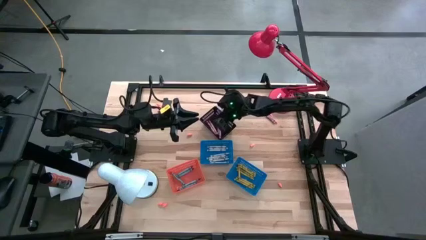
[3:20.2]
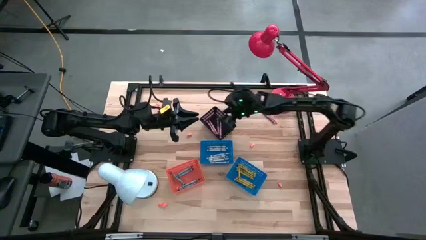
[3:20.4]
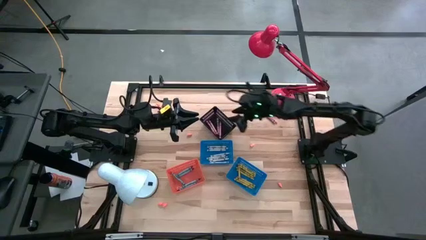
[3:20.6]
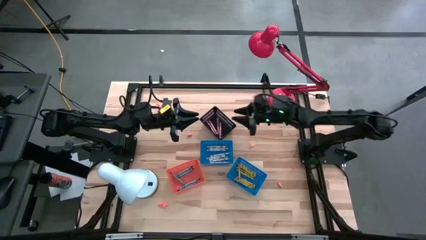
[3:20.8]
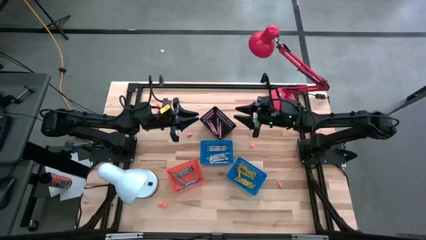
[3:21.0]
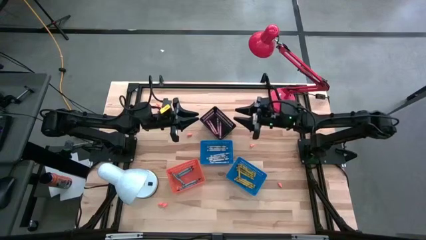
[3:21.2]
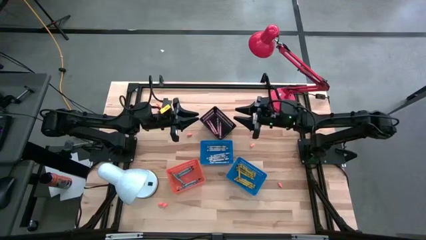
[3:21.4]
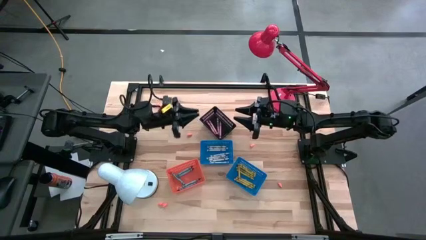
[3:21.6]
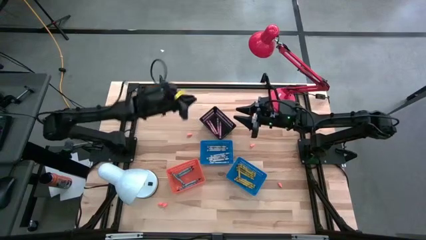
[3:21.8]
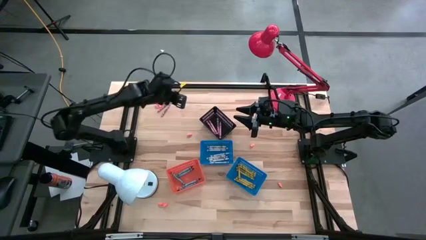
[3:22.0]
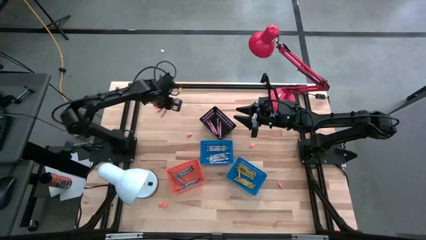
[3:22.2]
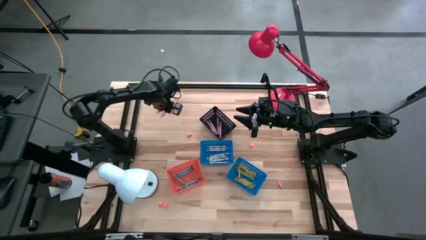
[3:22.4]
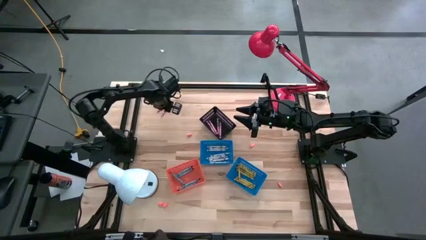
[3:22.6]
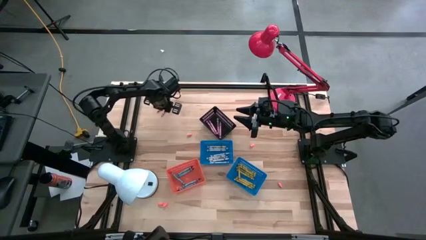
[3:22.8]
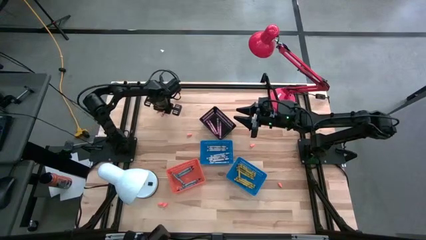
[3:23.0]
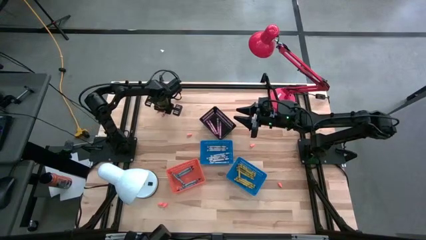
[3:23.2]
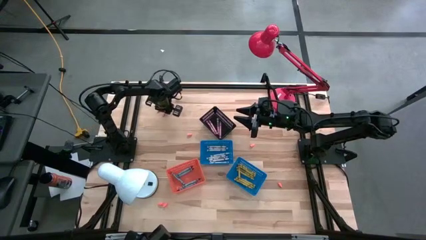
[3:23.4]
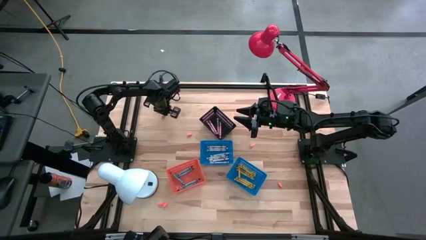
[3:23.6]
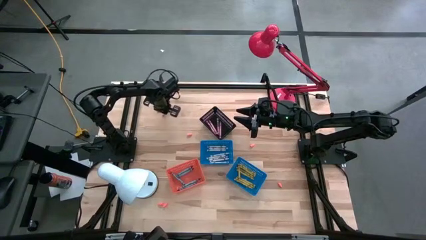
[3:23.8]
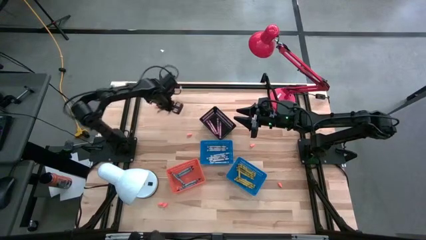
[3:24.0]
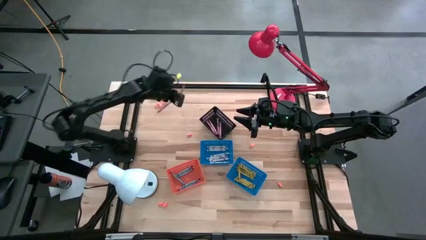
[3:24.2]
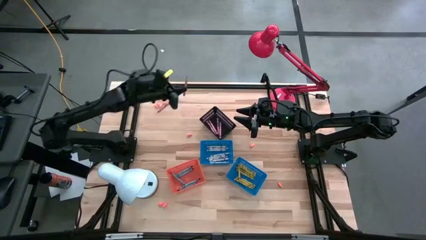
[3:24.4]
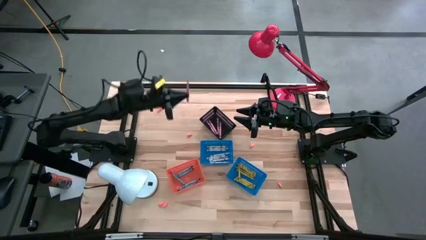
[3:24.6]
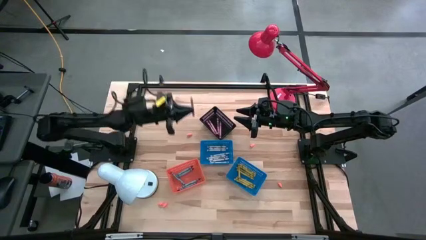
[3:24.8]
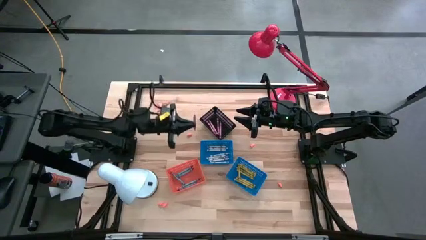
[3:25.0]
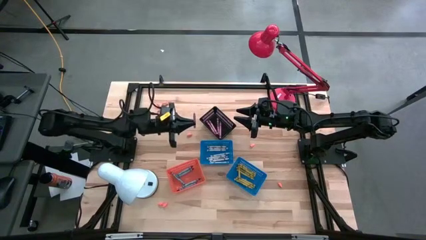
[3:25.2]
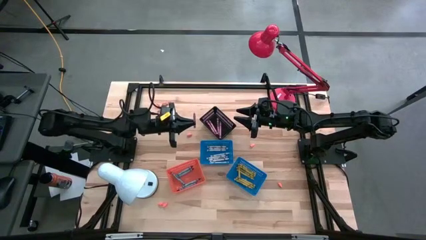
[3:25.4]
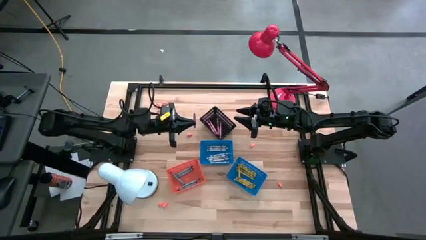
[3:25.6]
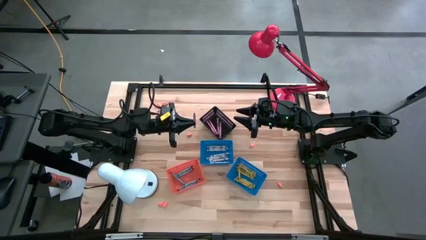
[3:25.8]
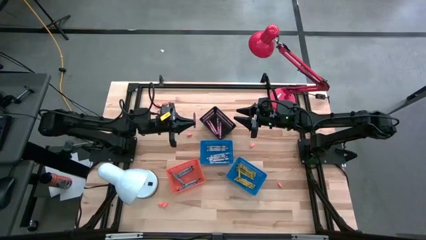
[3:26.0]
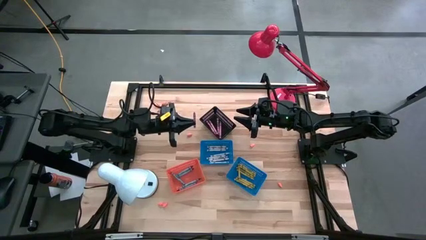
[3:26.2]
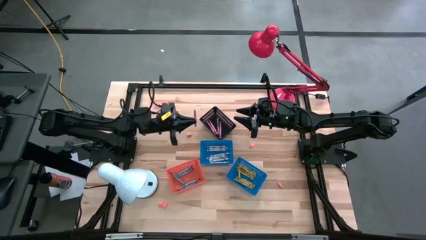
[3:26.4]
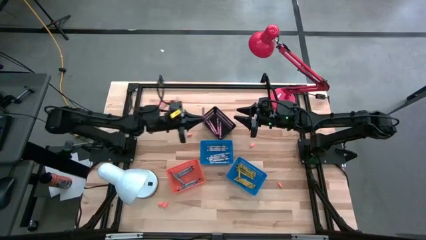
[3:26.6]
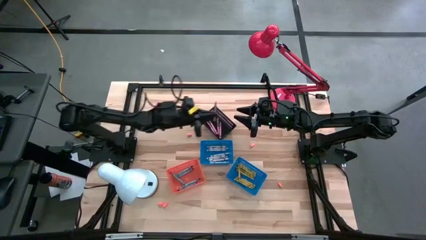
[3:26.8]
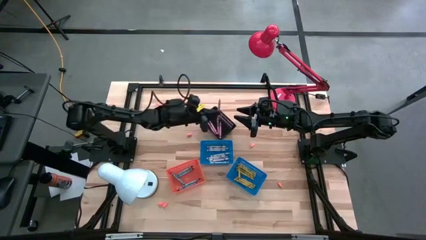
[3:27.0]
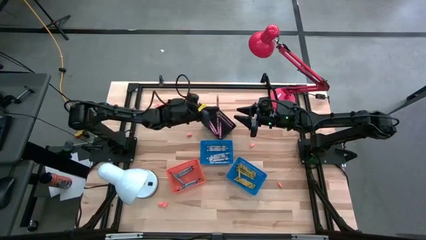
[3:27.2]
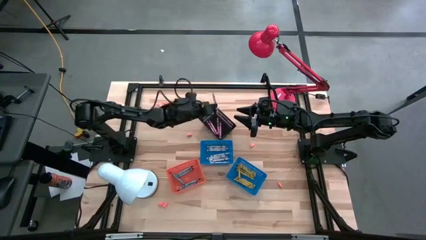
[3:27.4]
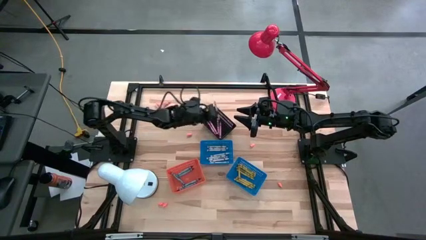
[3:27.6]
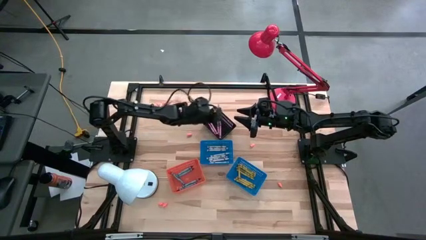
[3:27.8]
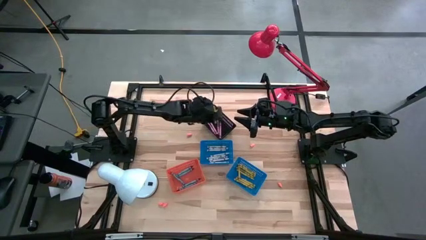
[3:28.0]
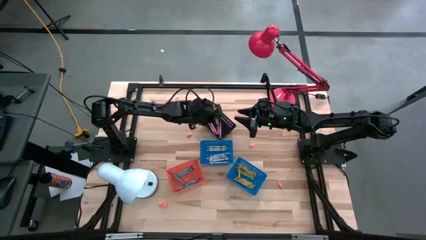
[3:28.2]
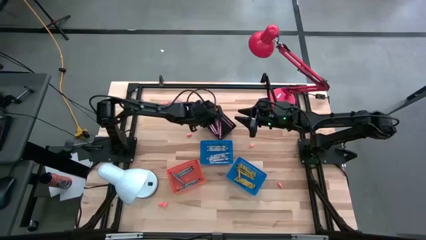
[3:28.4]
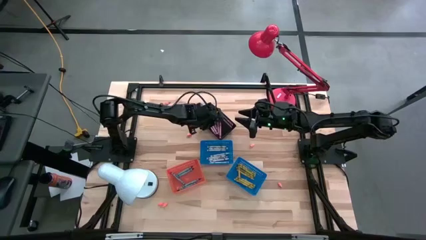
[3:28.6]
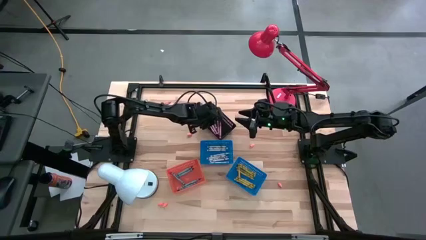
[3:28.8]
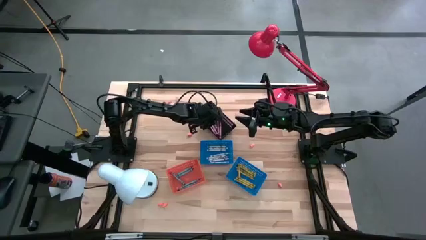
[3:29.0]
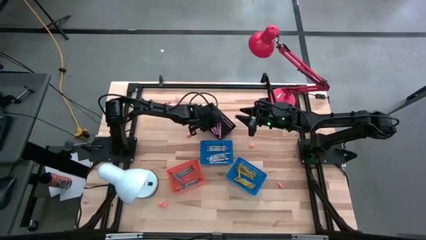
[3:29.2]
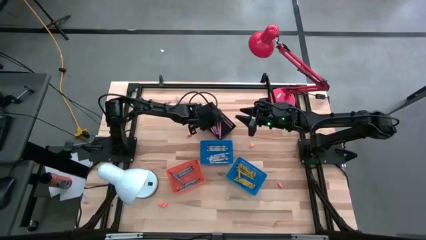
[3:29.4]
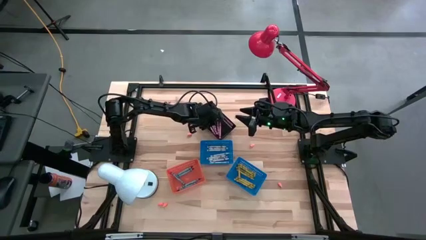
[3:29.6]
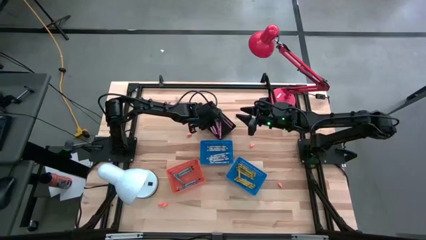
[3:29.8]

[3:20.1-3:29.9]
Task: Sort crayons
Put the pink crayon into the black bin

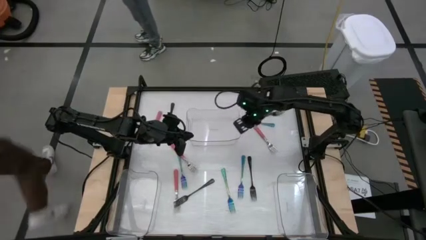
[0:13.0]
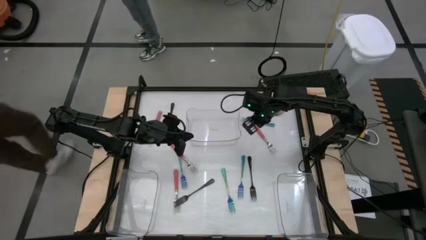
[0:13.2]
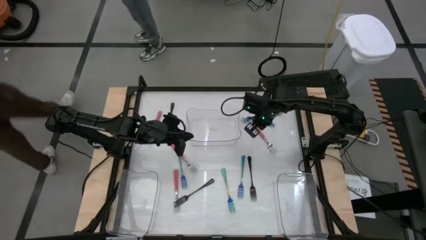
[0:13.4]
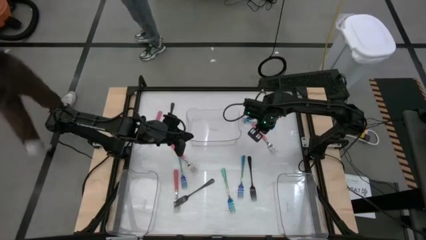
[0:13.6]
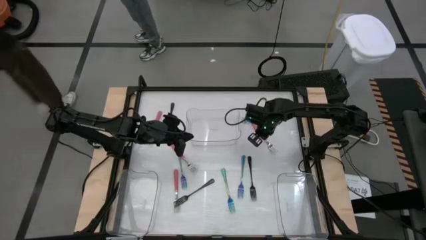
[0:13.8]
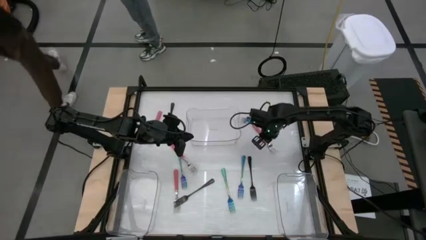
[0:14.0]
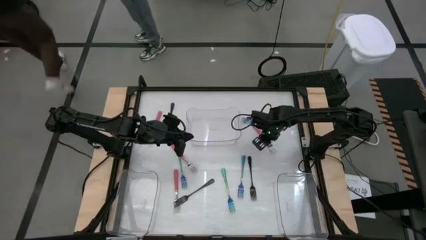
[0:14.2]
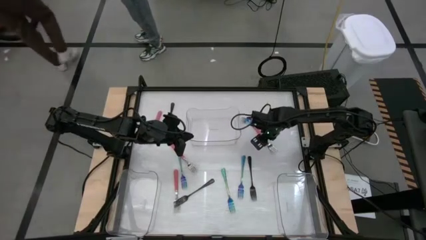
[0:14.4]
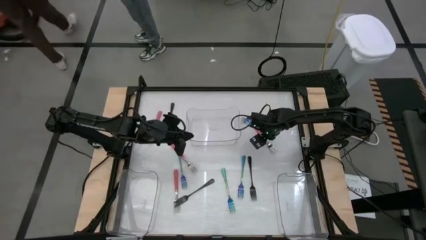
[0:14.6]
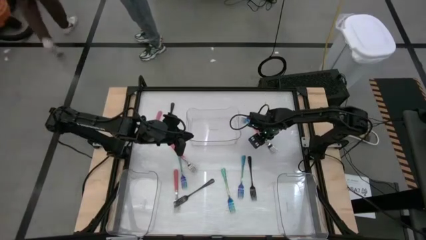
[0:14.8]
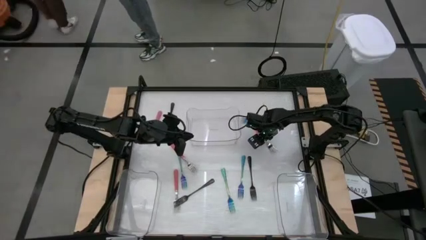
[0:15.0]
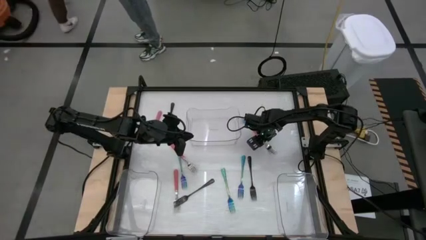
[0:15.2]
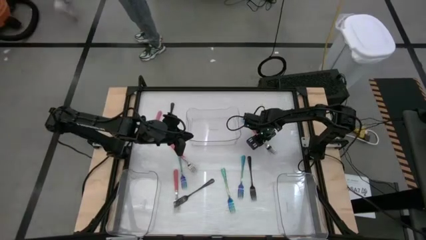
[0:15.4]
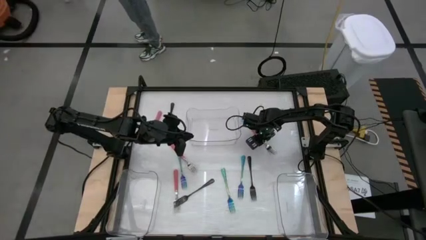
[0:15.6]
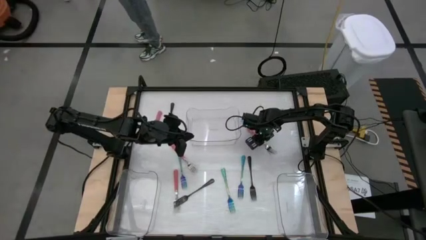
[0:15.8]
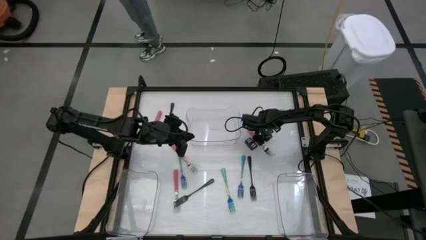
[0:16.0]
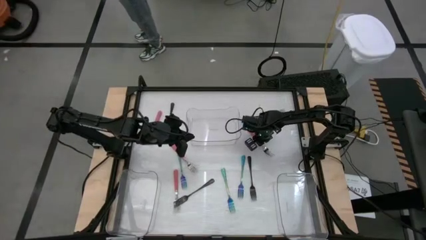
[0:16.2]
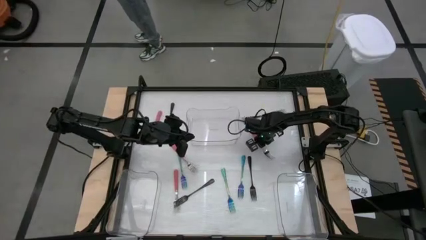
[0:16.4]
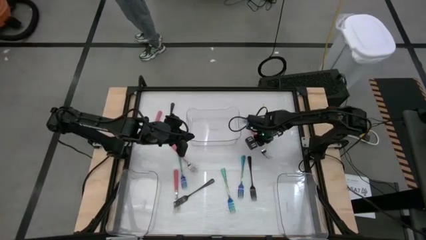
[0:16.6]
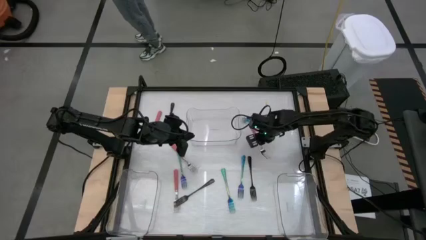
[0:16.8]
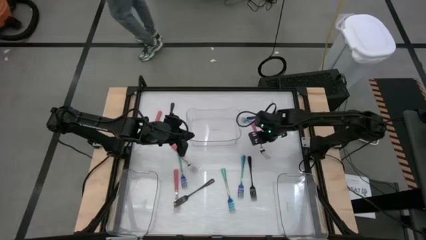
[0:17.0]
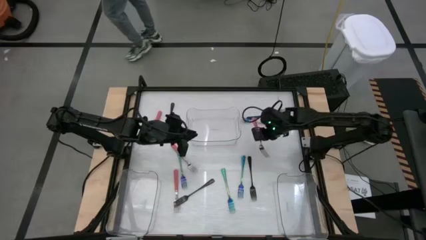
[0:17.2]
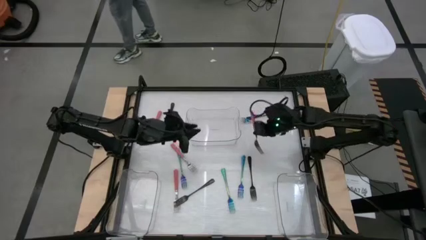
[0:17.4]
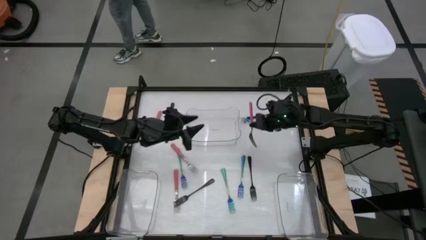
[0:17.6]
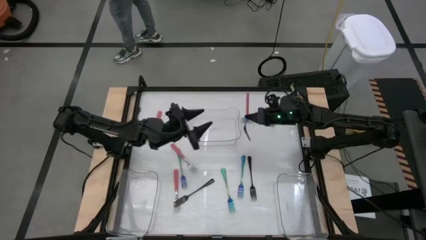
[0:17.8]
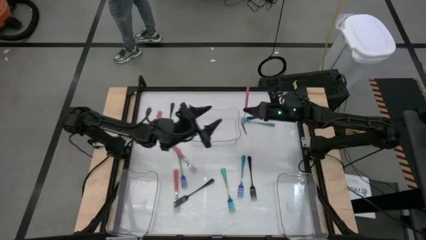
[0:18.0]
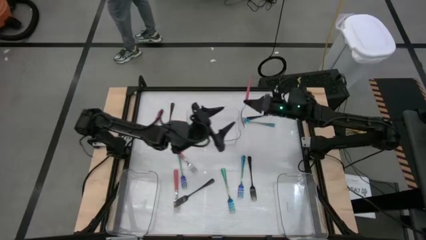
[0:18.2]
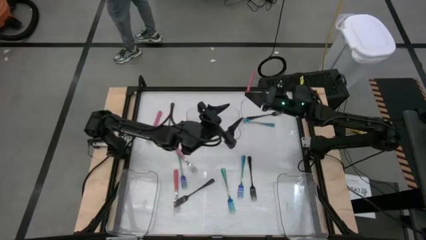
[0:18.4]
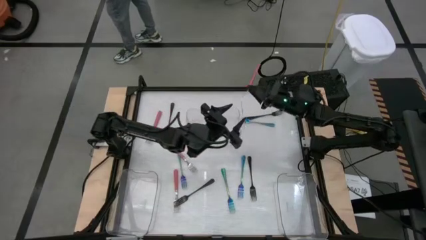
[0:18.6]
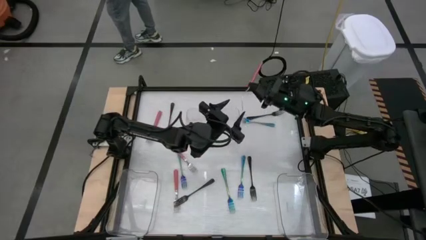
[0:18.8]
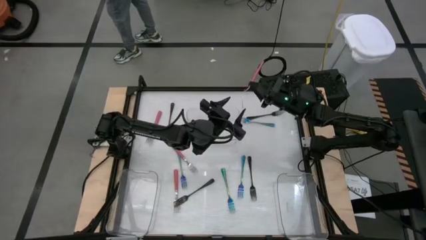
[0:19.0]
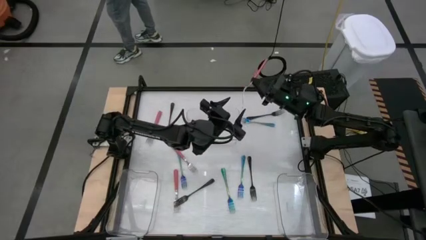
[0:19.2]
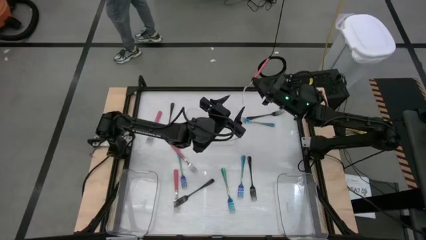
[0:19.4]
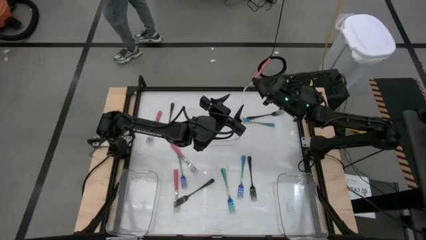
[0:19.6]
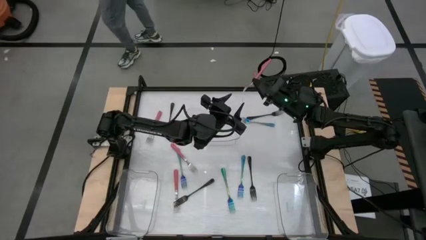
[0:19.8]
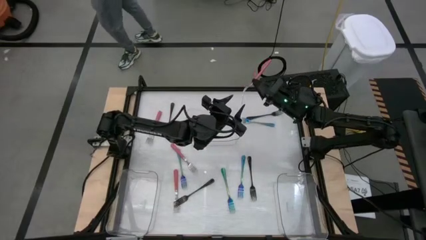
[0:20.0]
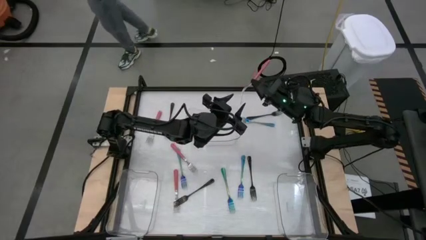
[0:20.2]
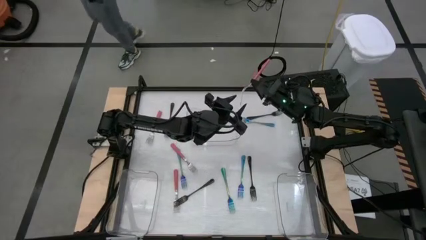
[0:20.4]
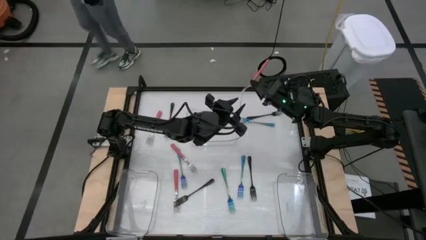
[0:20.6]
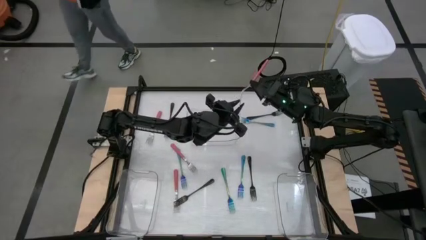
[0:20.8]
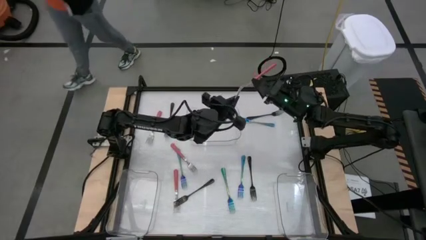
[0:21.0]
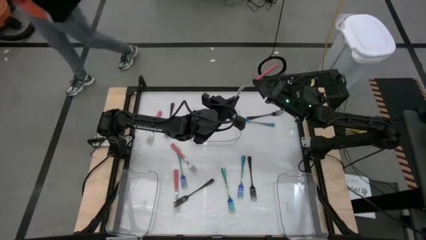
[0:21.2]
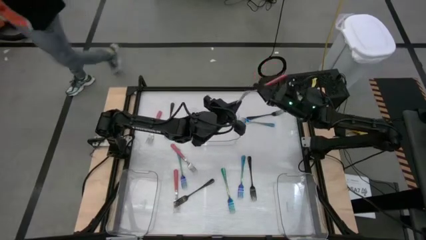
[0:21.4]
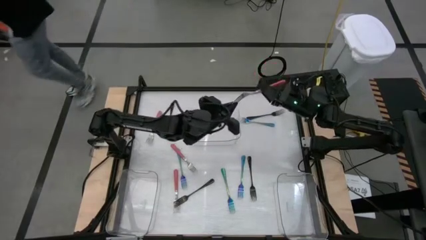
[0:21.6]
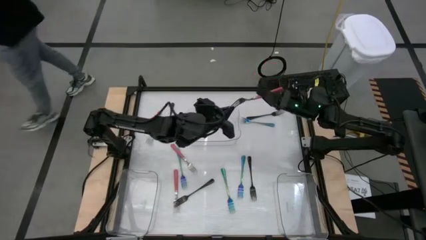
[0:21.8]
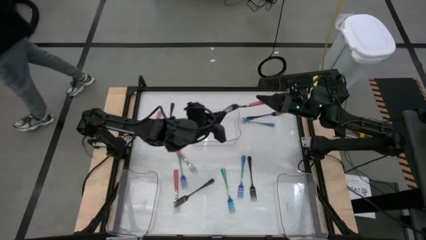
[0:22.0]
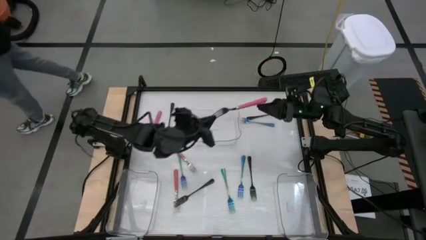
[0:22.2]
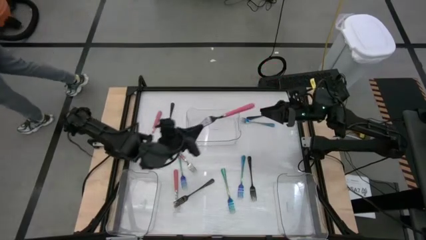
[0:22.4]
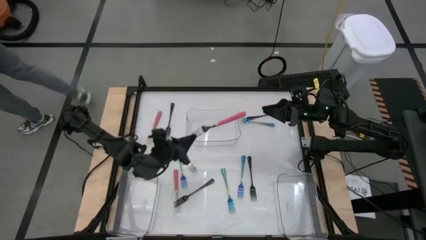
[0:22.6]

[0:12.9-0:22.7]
Task: Sort silverware by color (type)
Put the pink fork into the middle transparent bin
